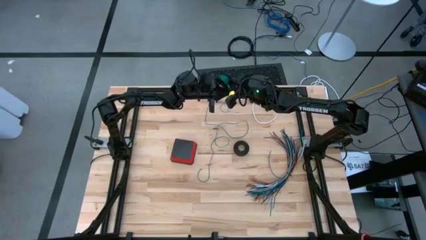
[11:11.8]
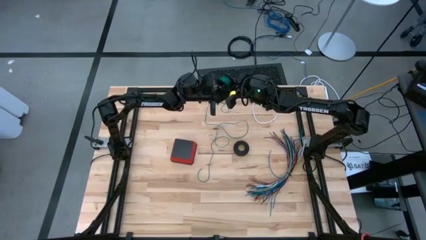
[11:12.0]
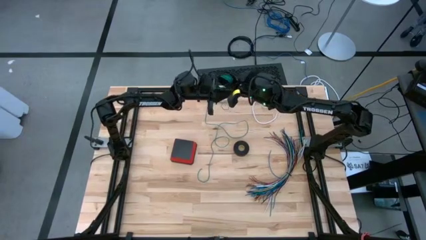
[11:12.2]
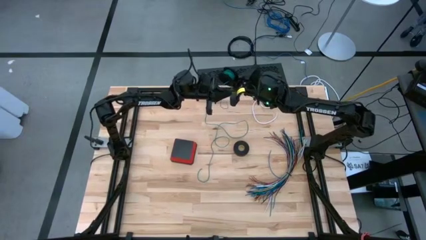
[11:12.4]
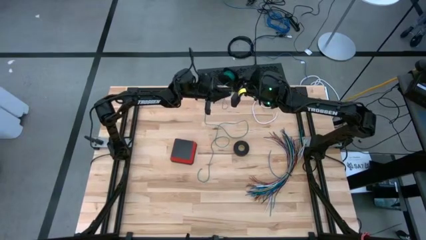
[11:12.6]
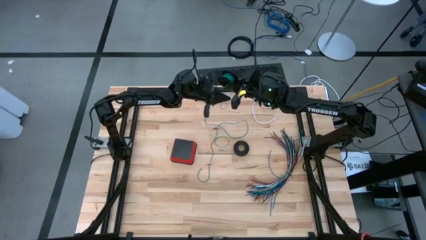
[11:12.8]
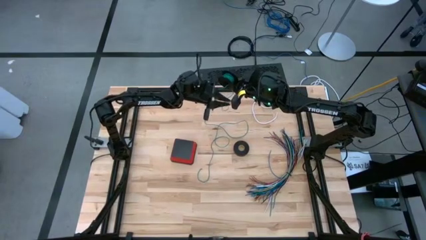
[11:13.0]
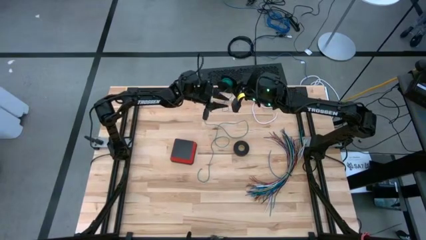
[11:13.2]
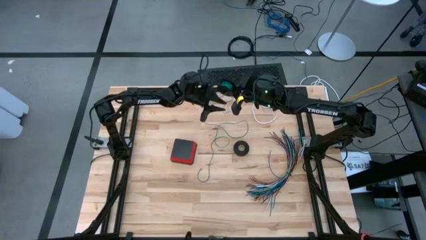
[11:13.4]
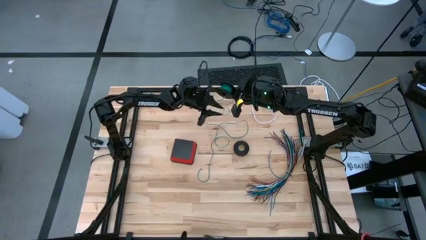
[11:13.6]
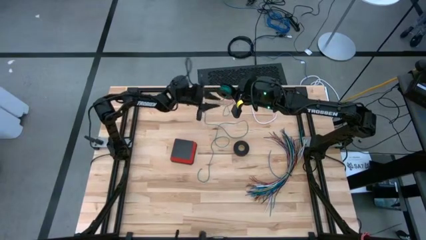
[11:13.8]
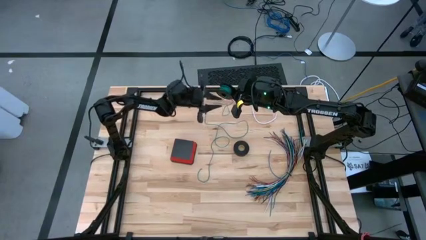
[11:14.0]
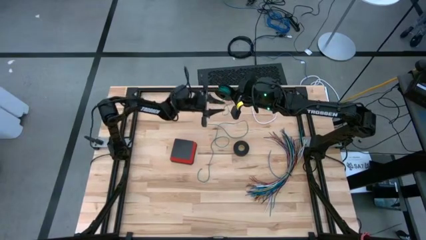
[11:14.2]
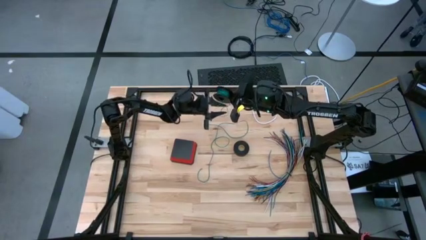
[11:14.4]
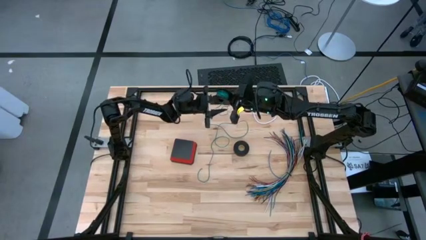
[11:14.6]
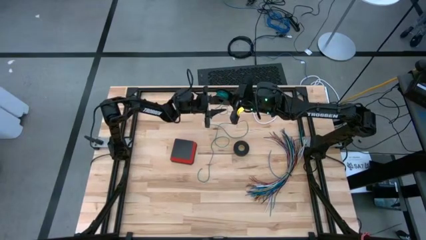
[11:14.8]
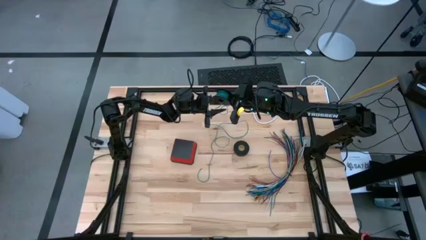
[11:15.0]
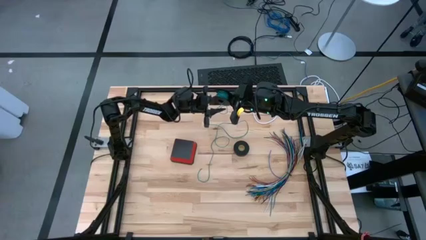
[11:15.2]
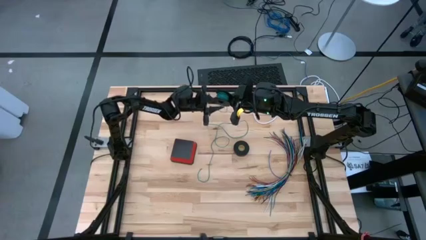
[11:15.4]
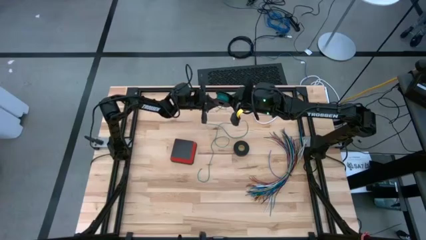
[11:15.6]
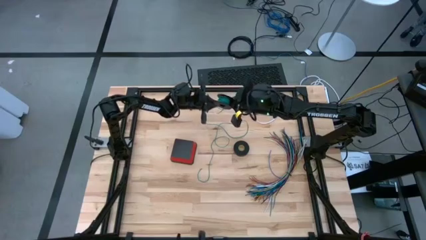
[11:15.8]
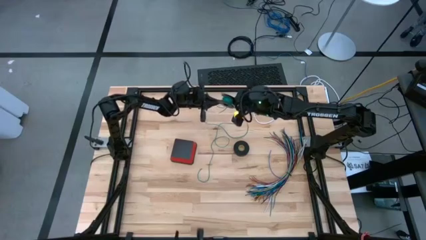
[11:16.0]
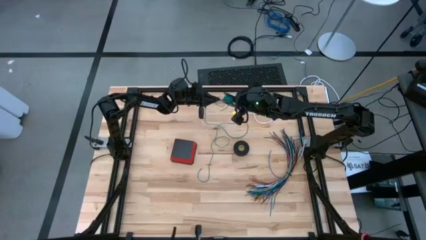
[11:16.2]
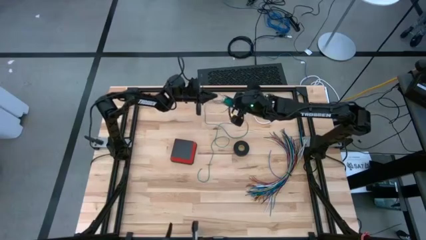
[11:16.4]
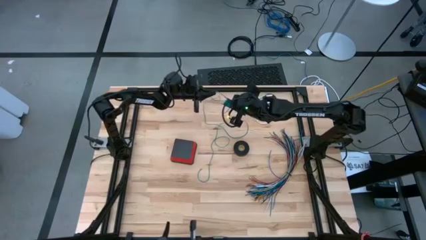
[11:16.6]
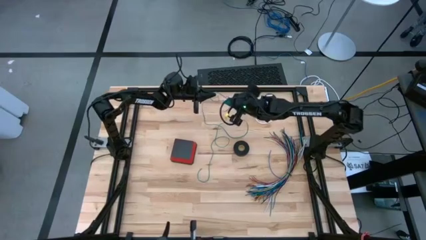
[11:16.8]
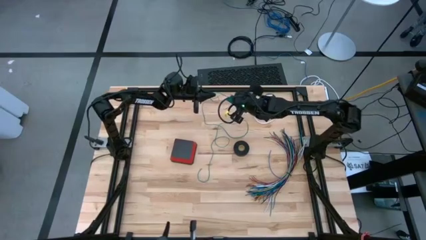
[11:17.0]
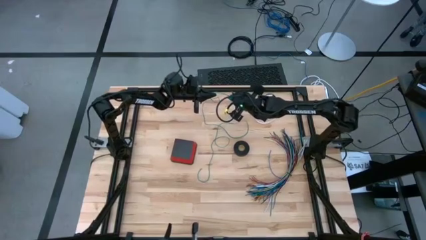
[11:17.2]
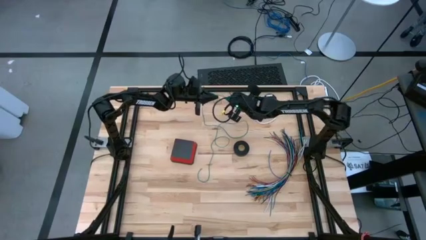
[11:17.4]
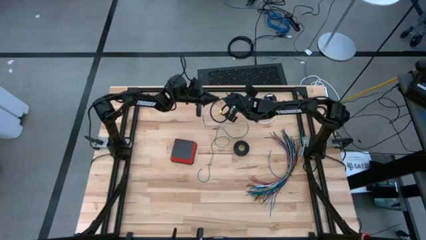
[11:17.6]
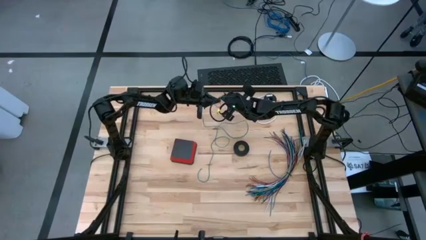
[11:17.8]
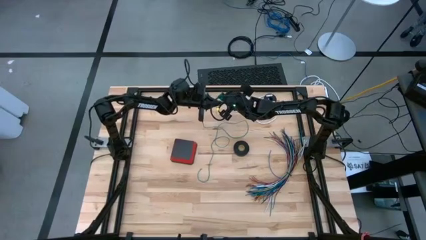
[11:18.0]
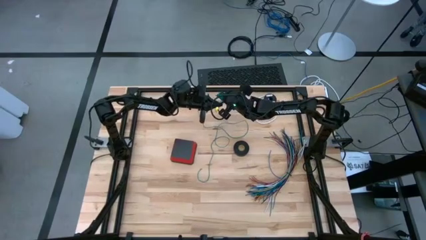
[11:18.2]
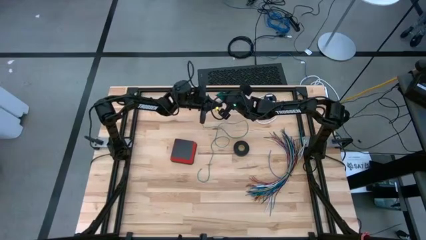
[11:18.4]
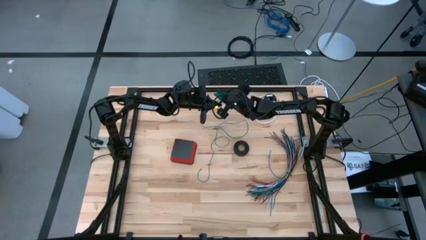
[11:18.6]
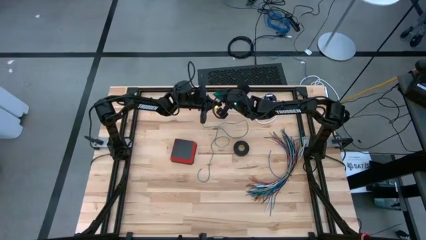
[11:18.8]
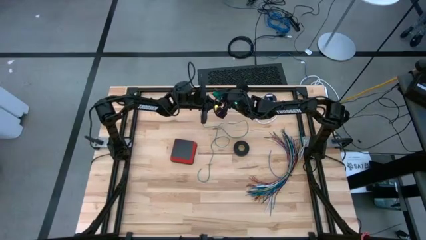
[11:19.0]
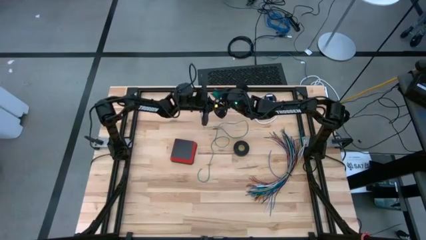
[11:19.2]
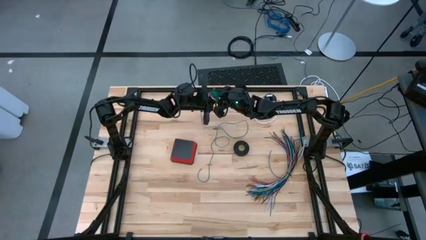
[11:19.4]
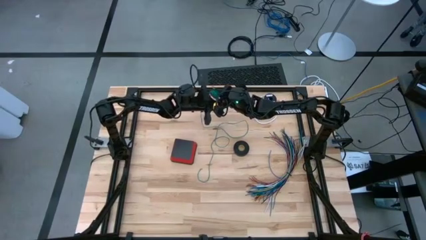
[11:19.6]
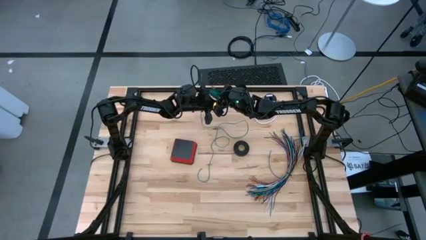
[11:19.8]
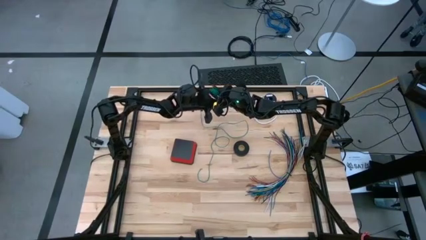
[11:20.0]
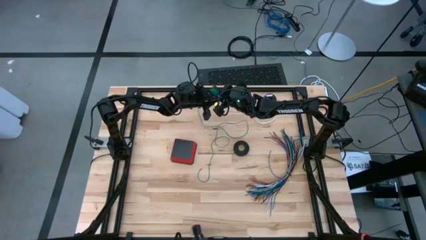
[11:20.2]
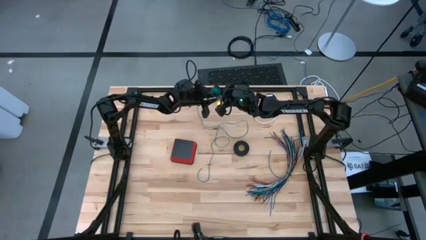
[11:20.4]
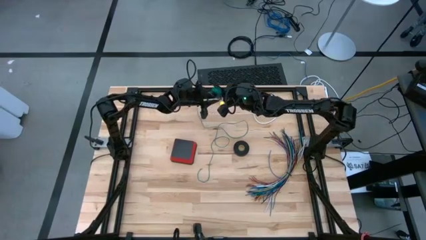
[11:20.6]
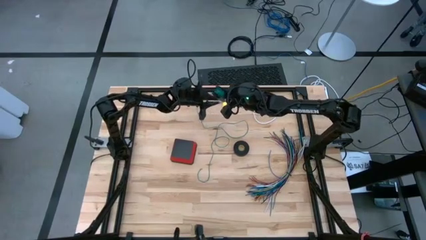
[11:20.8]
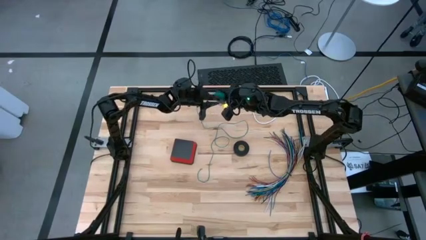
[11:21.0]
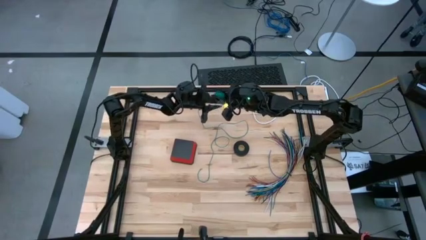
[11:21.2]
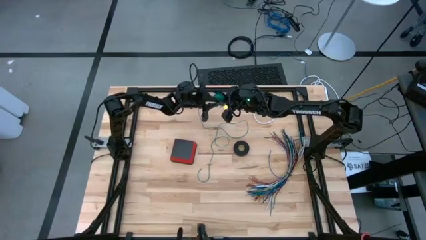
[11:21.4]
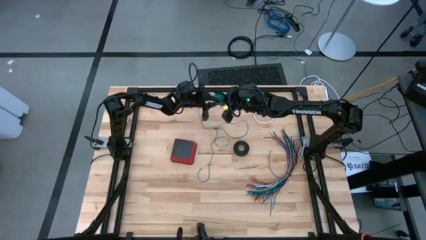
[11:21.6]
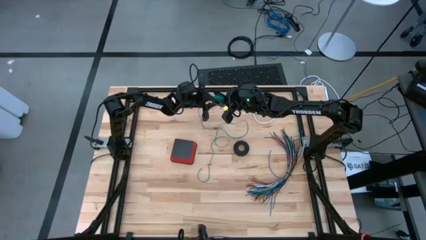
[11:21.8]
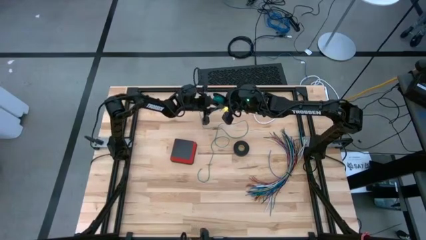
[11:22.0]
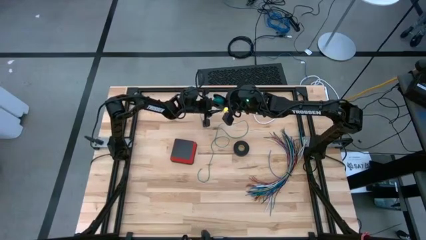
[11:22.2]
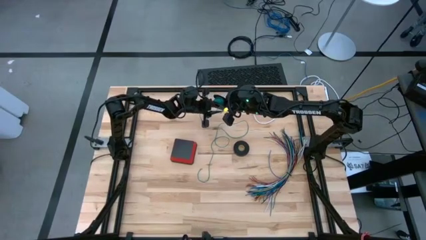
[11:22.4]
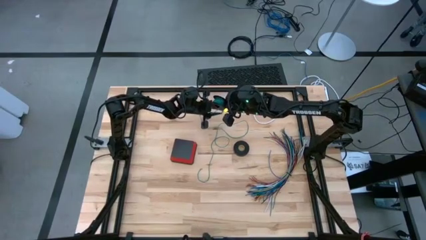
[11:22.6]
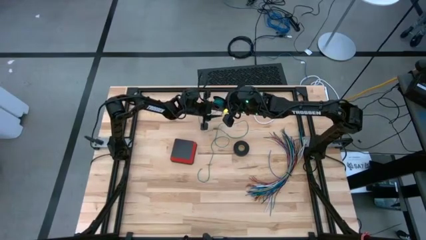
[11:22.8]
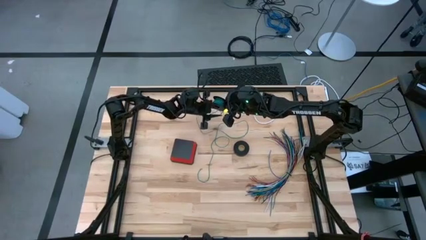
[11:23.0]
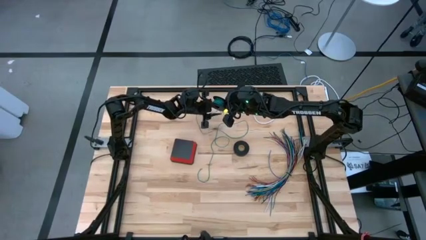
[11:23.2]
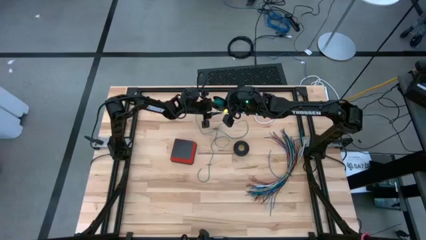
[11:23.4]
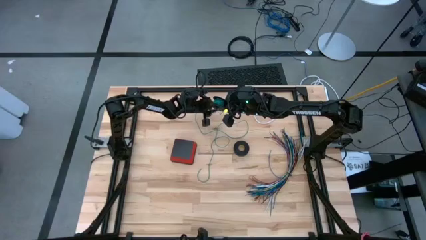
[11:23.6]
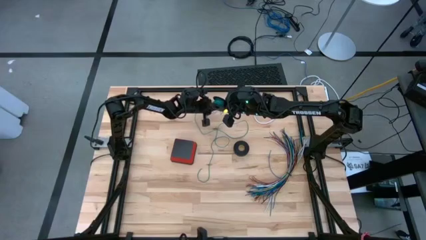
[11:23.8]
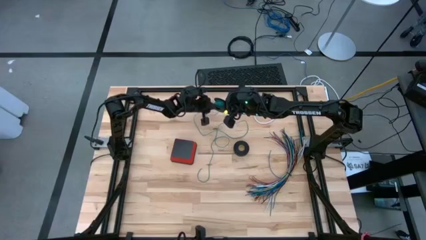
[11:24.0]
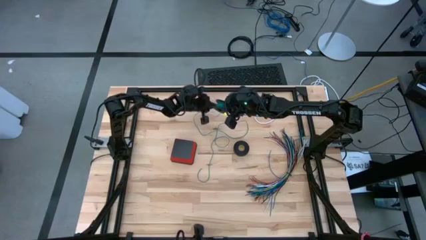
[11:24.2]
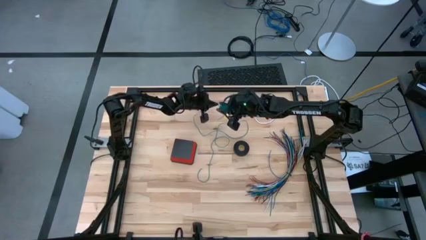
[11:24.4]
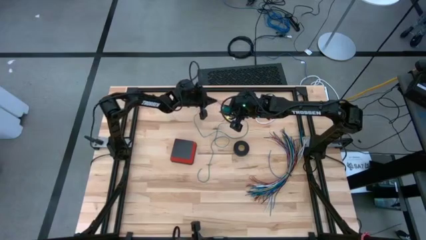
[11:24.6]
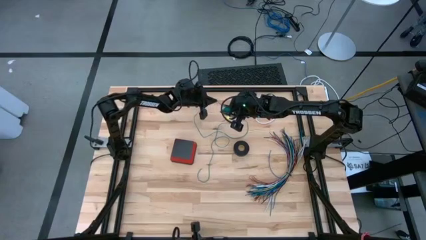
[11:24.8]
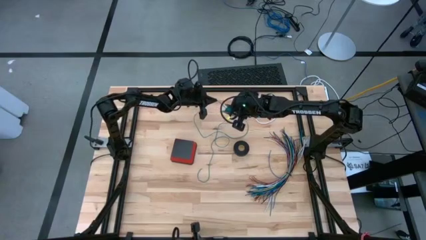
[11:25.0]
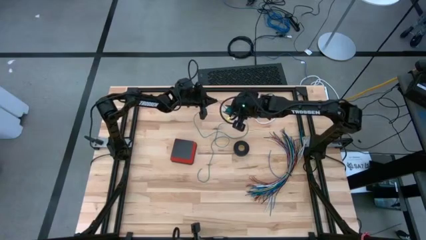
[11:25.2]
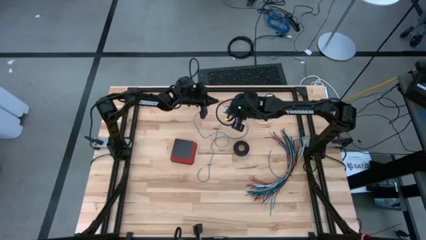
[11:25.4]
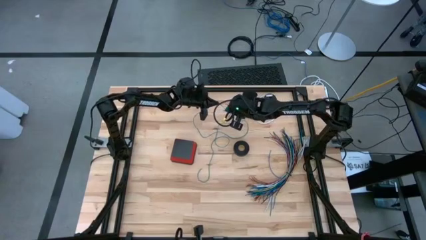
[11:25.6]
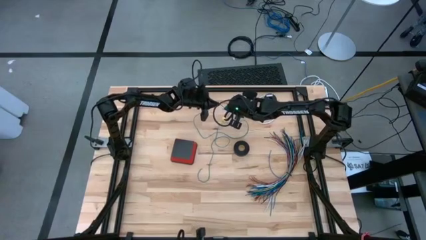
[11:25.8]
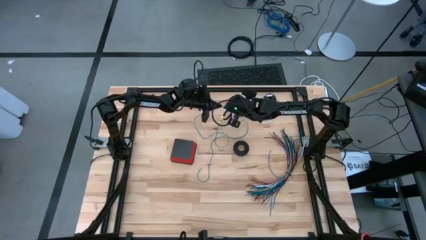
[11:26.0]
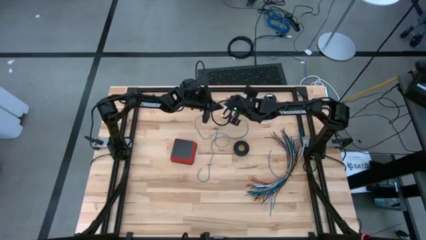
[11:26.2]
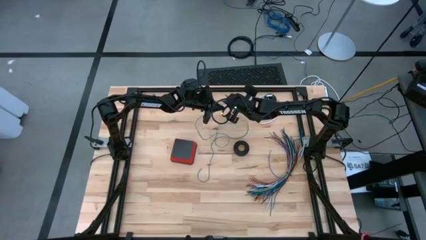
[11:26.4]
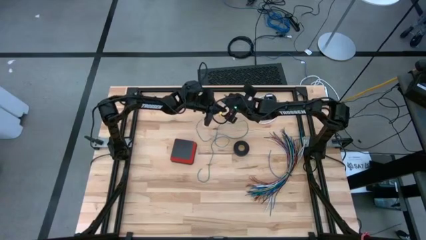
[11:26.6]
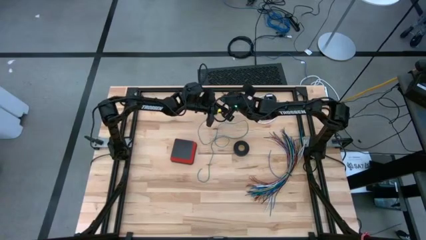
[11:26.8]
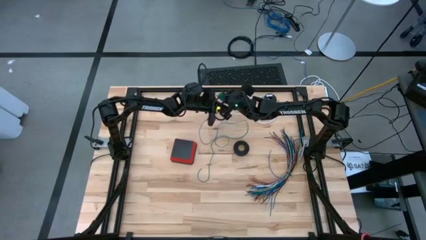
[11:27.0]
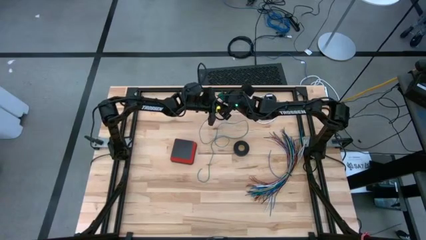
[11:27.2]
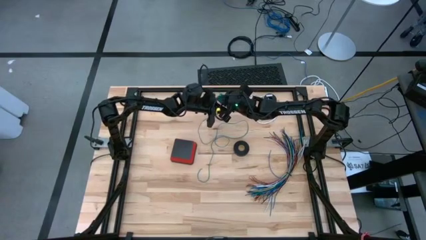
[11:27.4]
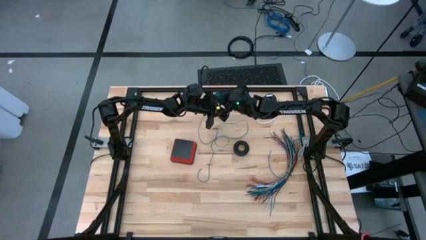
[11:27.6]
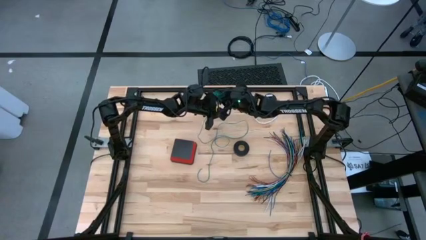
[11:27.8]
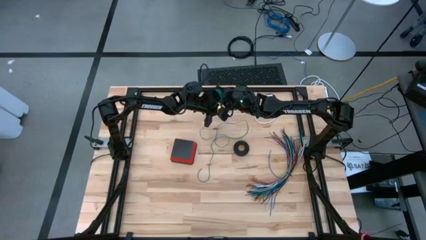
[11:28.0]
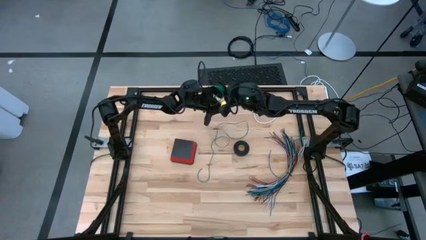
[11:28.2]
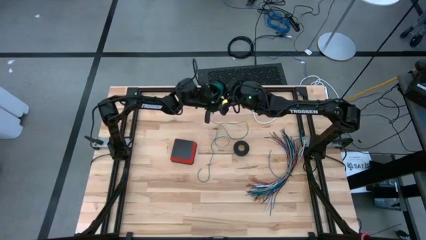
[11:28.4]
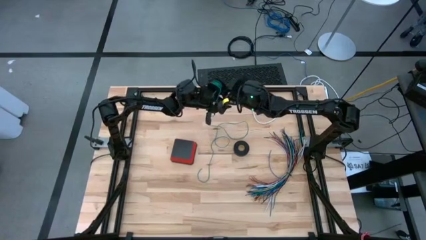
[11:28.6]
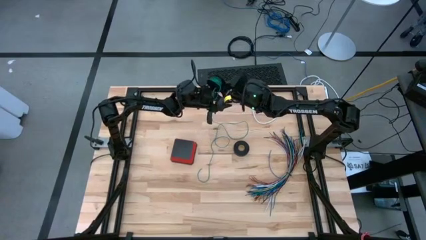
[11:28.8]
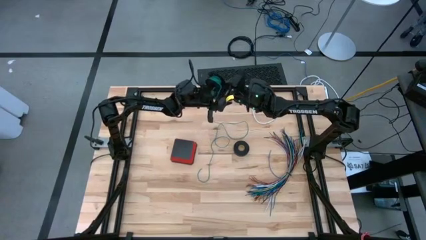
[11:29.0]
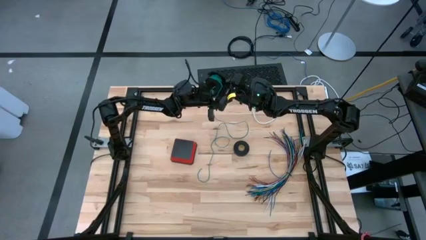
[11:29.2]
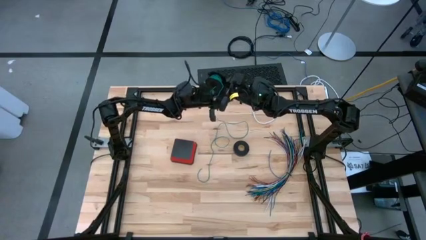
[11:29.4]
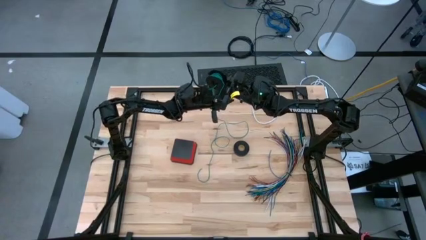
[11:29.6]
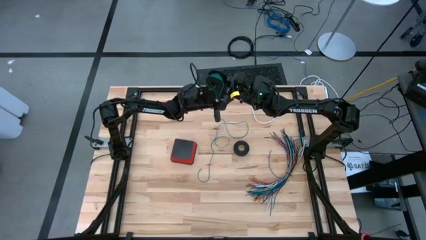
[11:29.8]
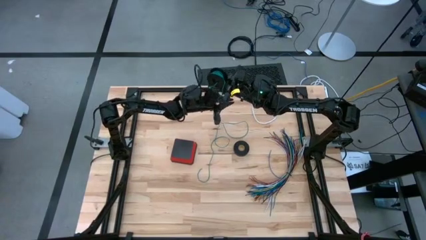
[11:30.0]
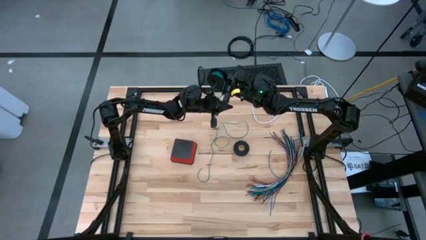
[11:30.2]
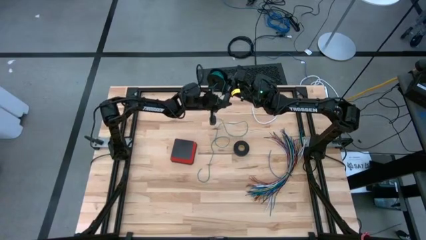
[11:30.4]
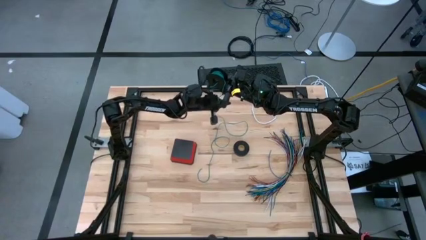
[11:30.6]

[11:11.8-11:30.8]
Task: Coiling cords
Coil the green wire cable on the spool
